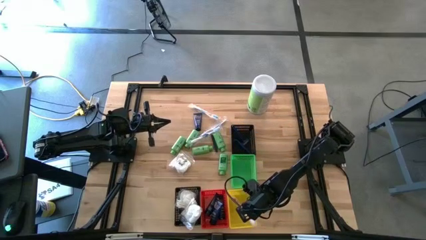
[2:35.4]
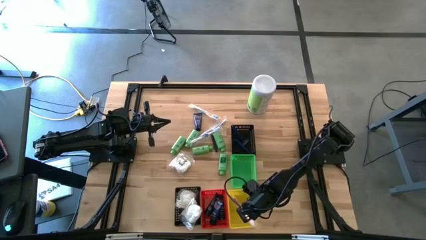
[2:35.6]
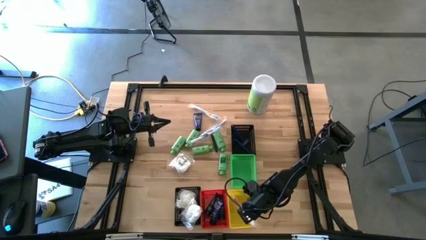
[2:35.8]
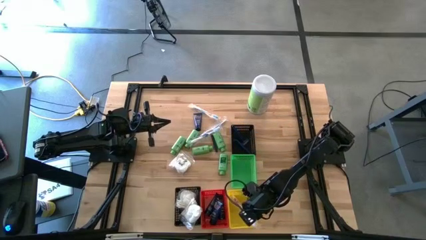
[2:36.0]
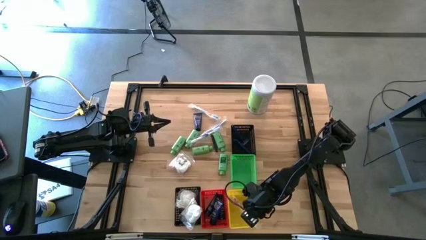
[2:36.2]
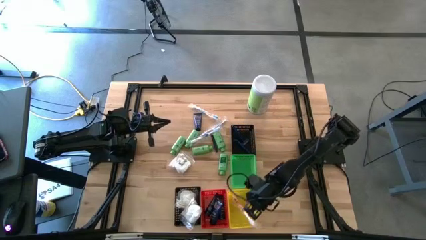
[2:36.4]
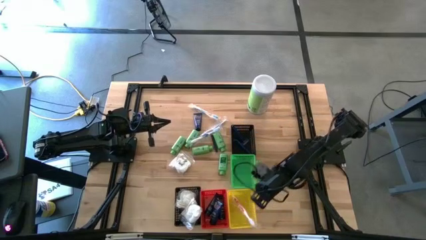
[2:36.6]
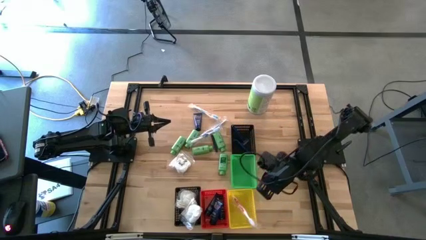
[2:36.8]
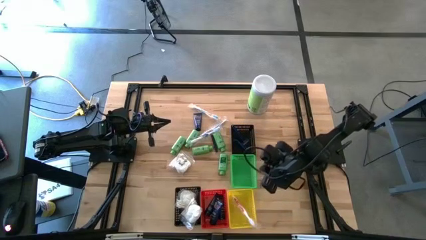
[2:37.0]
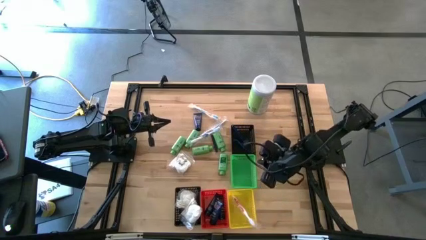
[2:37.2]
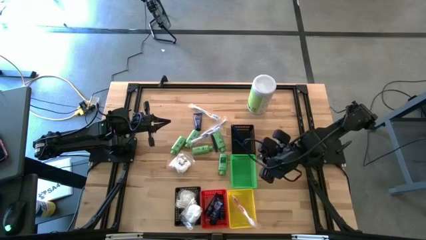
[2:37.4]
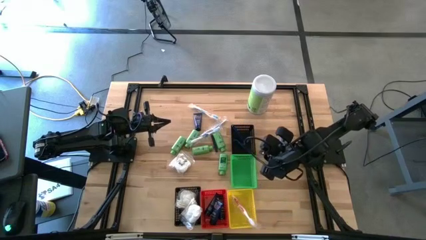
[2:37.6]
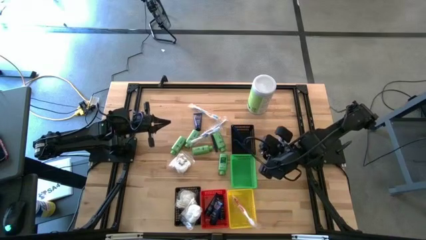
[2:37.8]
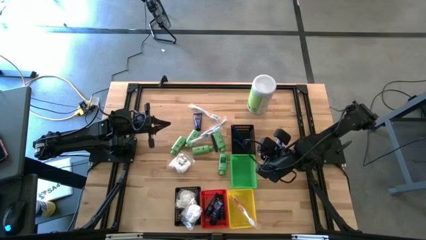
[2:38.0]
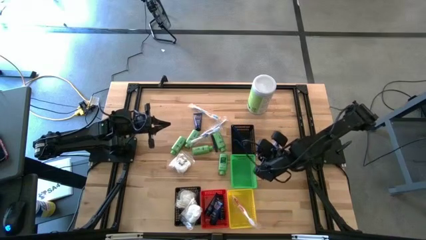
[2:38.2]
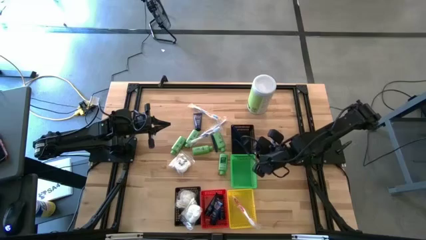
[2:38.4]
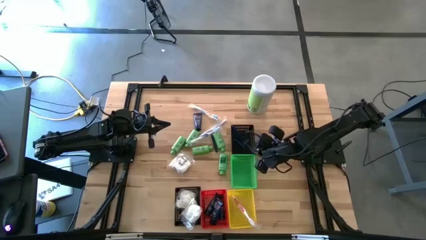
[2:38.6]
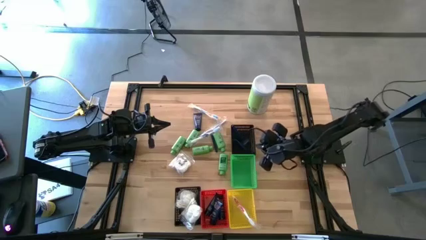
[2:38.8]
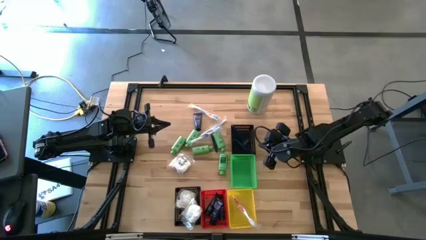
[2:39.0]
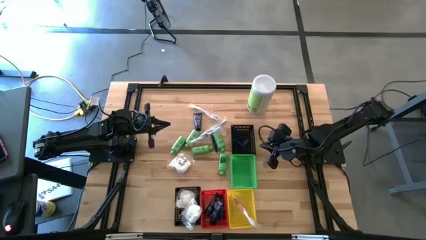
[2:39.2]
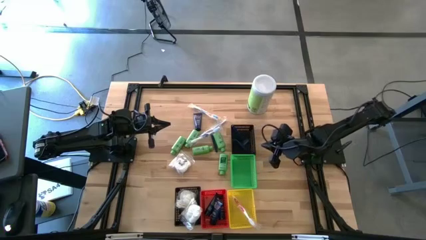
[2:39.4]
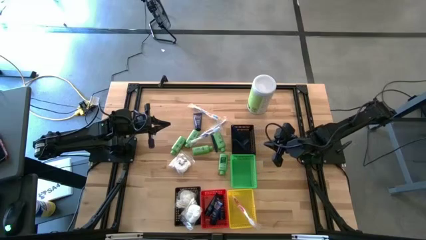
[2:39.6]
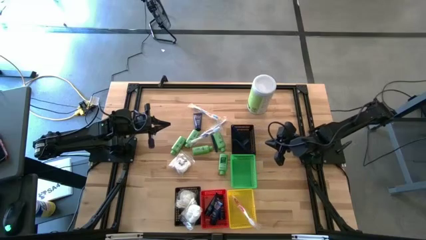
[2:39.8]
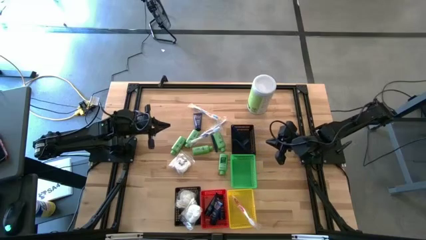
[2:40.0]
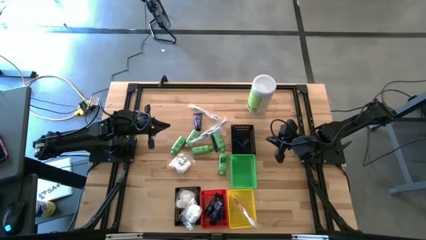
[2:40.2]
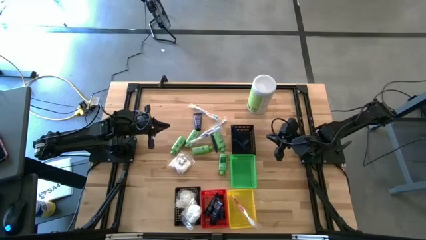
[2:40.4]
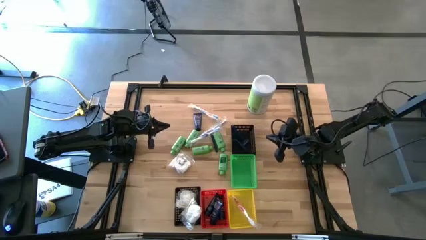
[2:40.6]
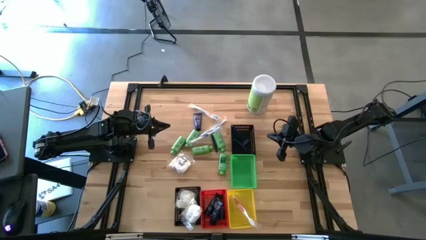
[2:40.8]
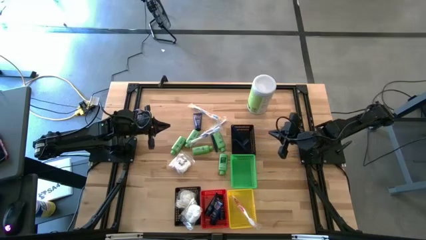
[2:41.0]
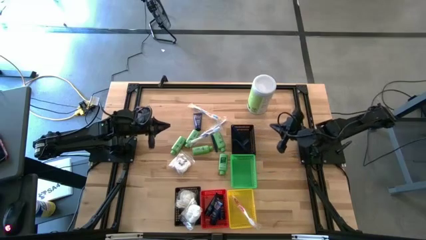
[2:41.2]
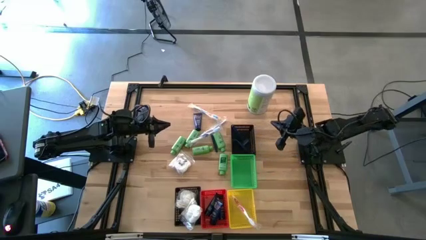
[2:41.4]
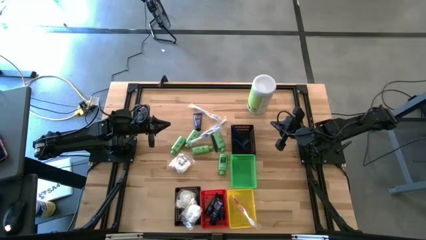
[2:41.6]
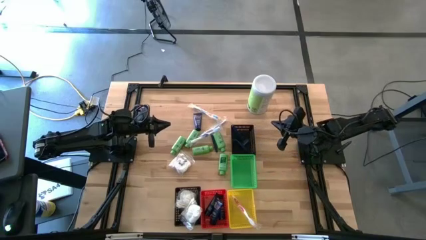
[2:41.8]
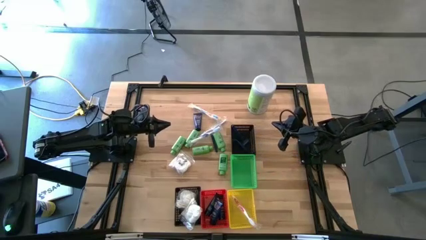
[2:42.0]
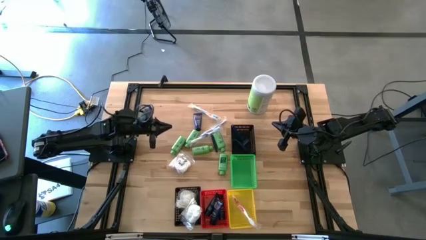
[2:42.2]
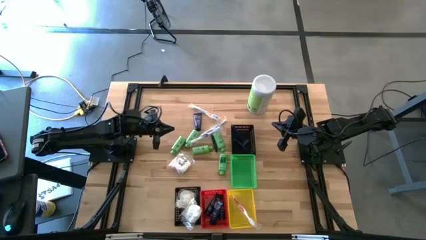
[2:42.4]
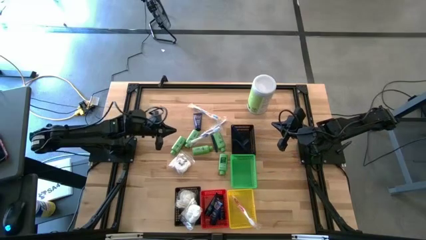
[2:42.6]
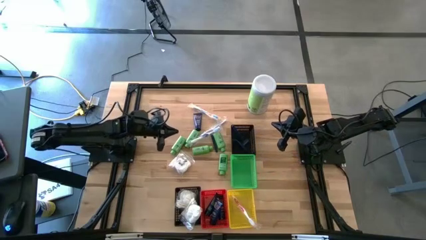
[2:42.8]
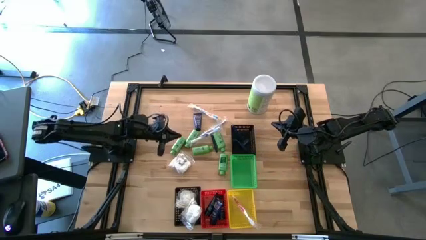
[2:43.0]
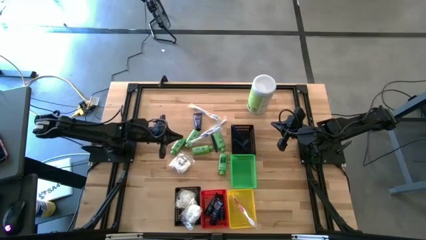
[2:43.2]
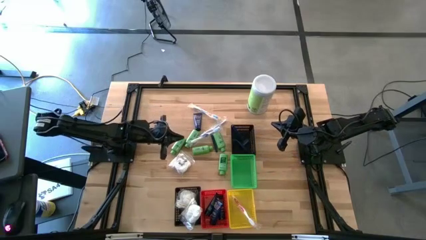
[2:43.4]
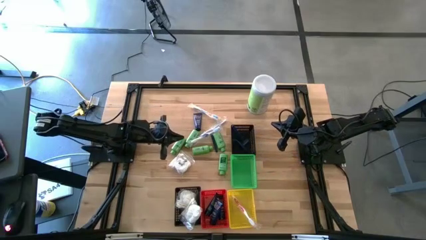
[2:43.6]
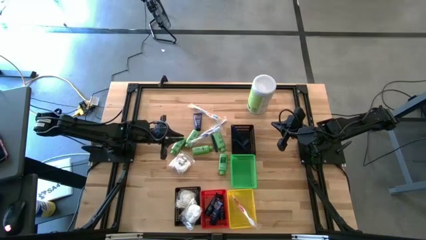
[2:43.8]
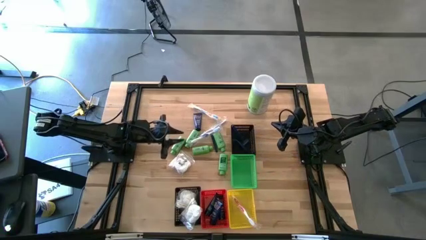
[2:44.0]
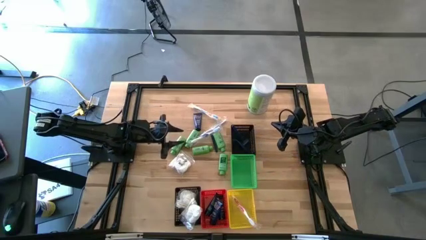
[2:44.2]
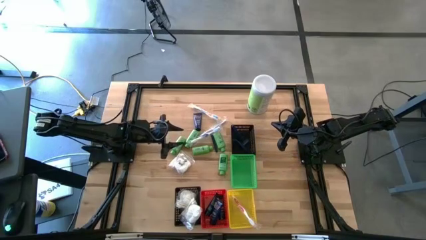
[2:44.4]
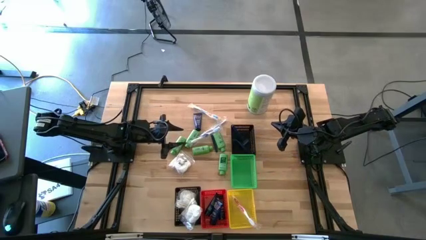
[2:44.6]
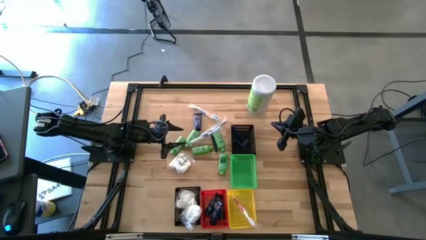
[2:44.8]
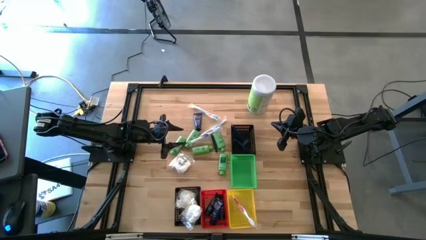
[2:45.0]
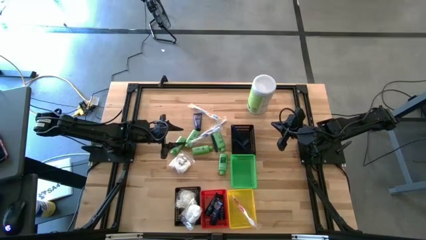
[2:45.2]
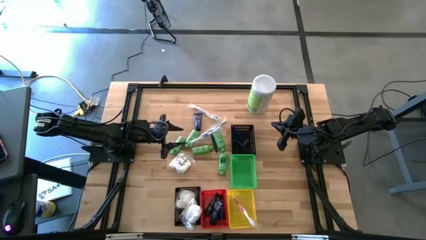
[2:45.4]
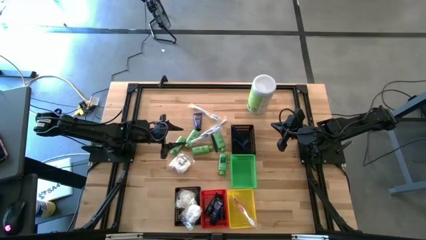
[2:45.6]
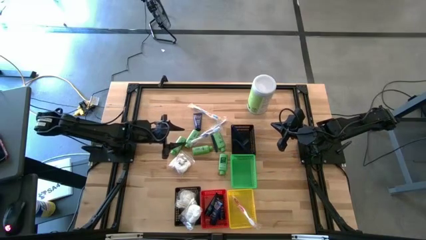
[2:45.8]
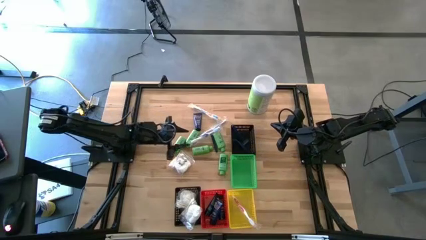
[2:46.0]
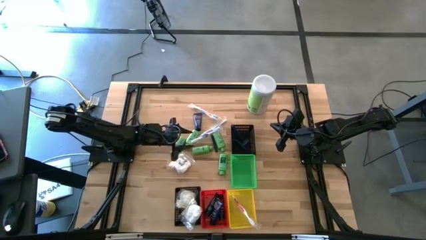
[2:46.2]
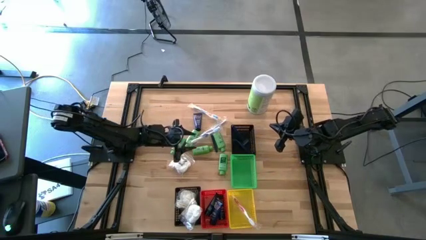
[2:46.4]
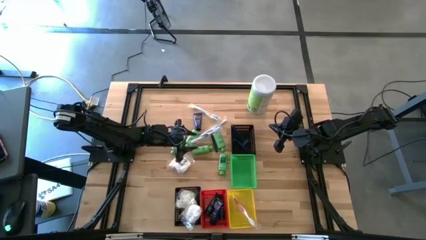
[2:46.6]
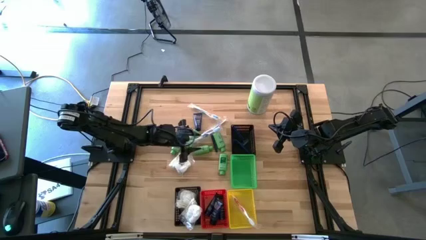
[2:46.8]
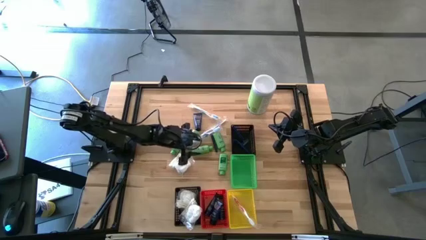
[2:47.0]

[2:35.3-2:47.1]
Task: Pick & Place Travel size toiletries
Put the green shampoo into the green bin

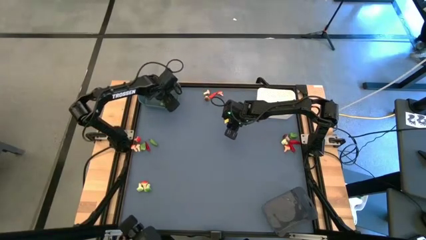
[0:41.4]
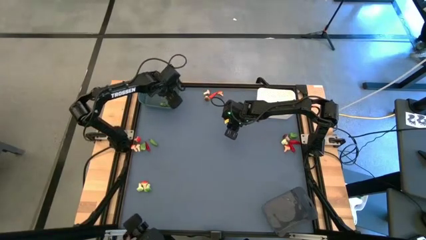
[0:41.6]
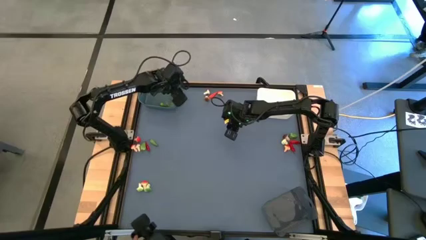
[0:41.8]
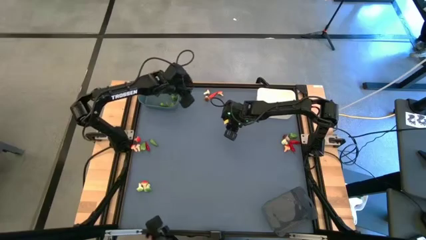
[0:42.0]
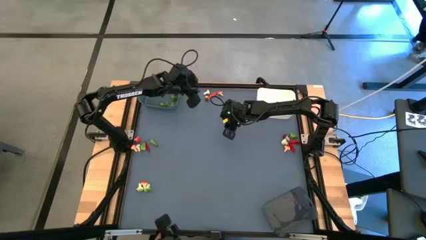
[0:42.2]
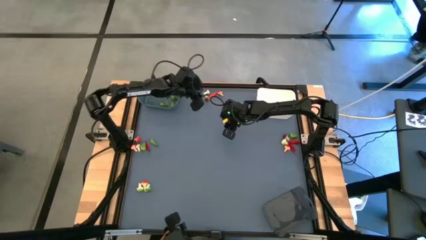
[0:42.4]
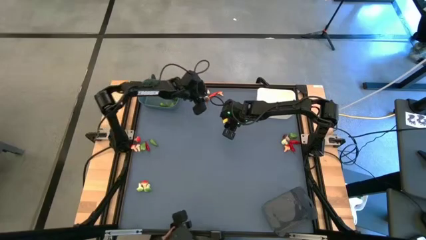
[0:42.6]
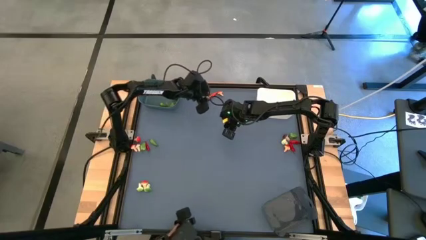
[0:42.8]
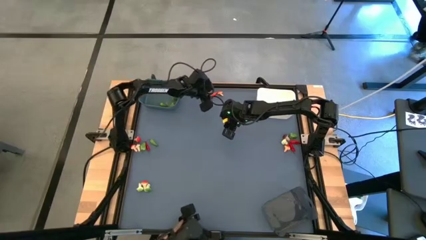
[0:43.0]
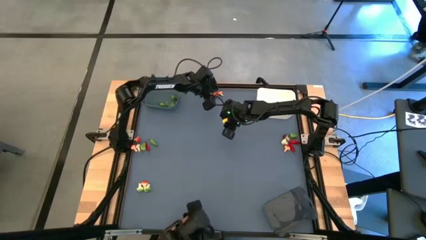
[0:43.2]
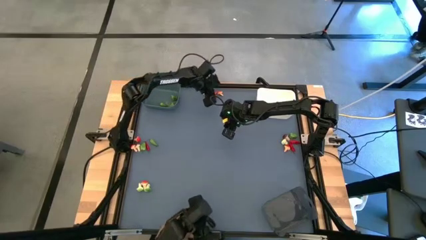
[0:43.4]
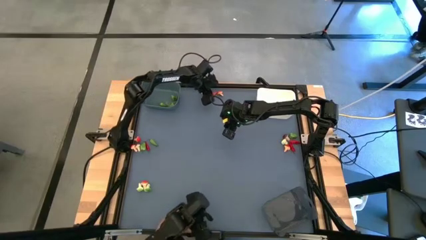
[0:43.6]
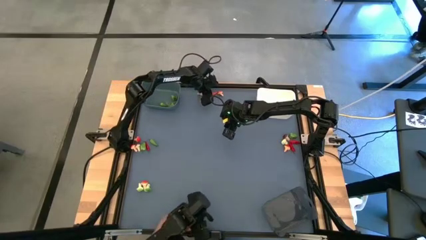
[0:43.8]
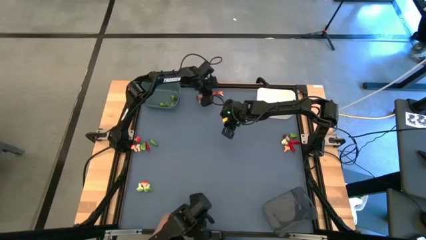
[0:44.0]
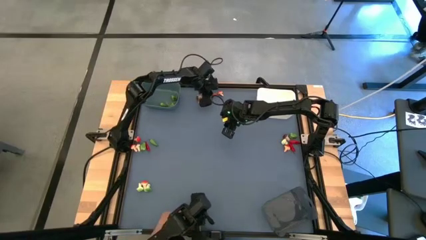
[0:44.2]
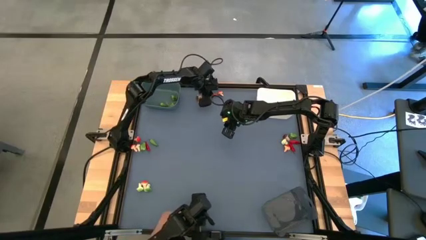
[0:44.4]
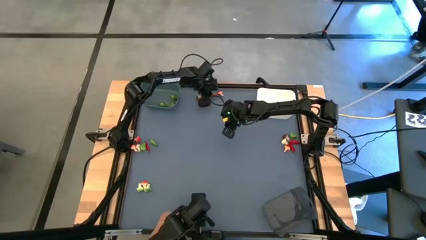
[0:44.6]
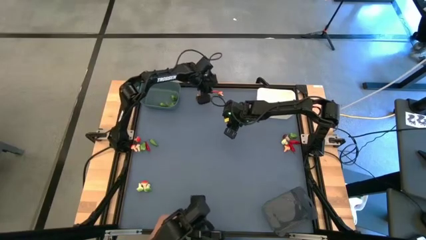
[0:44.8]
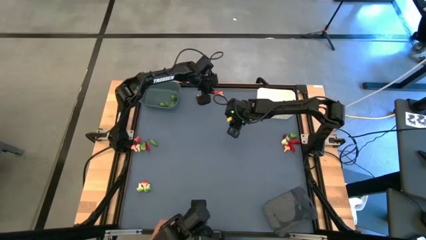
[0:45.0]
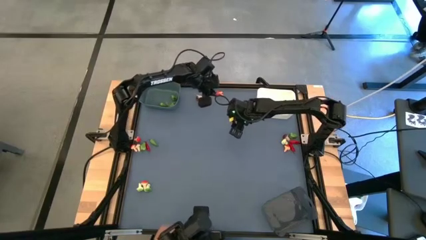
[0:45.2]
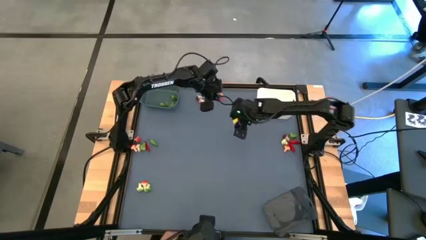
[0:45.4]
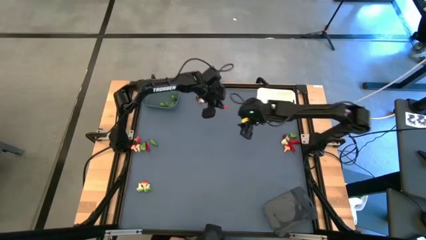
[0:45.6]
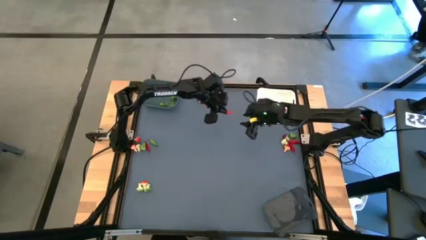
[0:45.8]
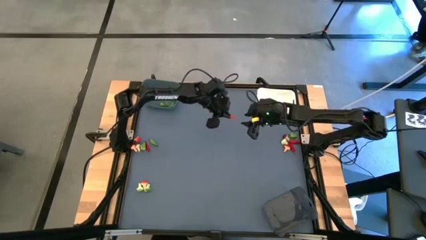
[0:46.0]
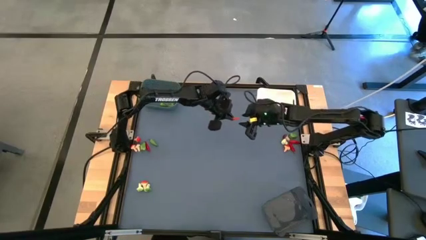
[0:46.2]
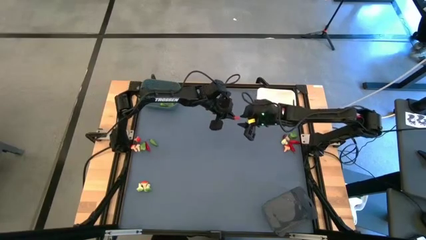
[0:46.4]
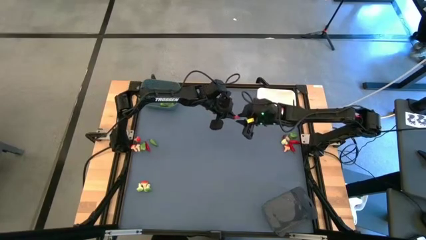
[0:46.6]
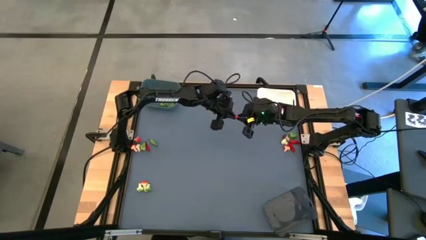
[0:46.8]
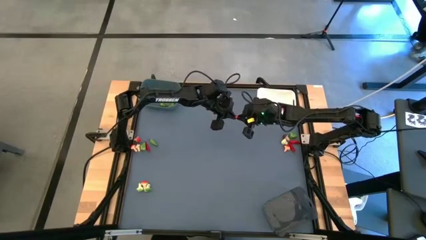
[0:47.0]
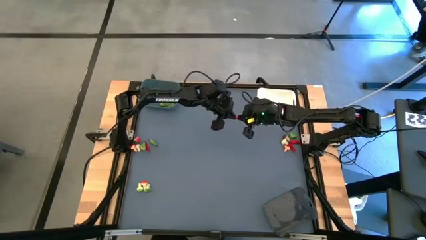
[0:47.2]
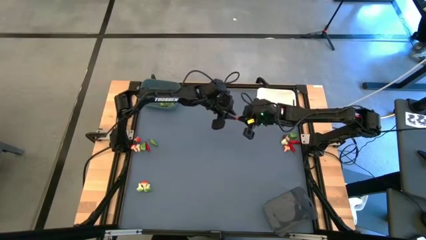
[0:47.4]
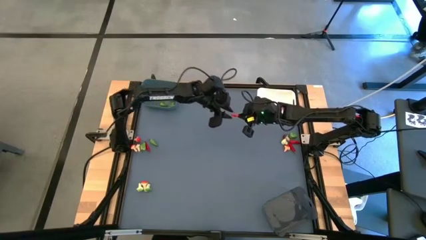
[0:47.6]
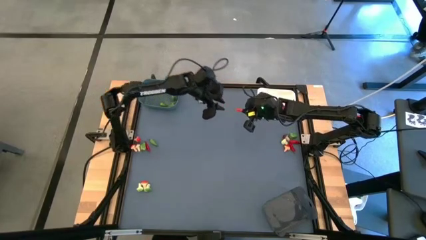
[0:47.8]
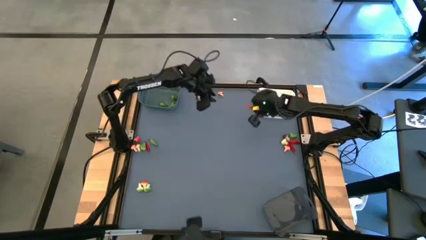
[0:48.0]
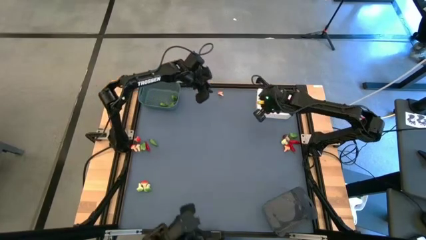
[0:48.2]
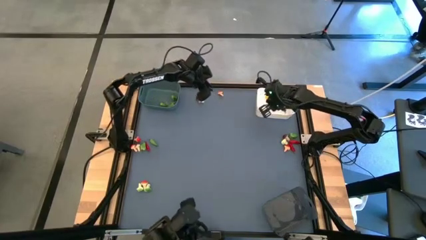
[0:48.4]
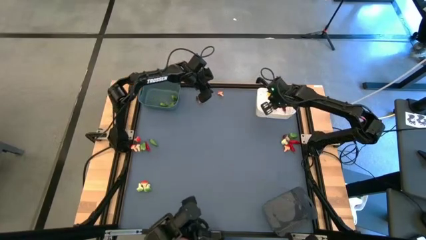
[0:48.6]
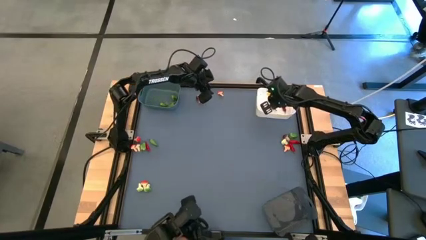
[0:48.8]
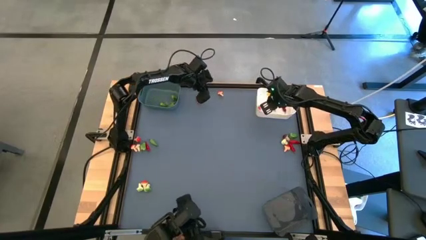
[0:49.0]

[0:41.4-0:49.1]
Task: Sort produce into baskets
Put the red chili pepper into the white bin
